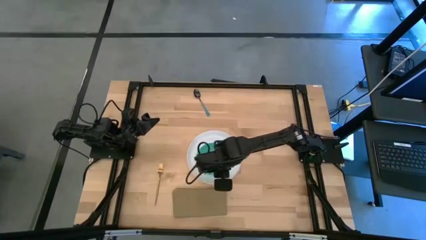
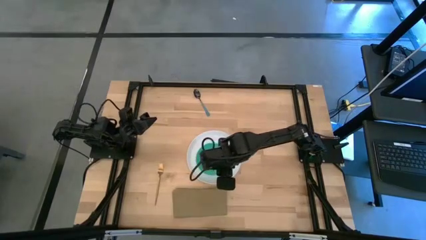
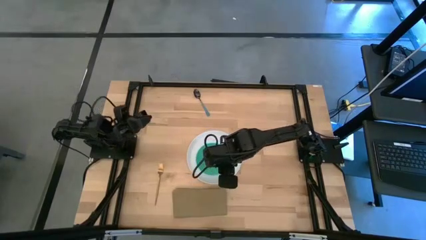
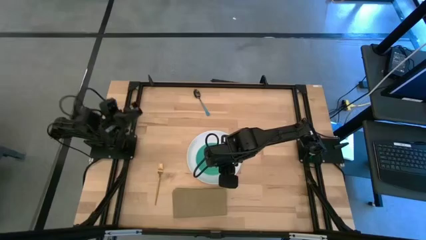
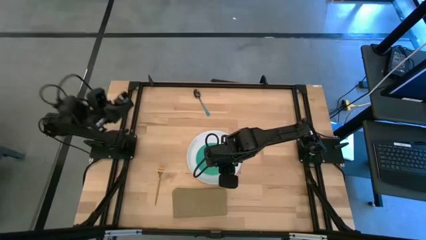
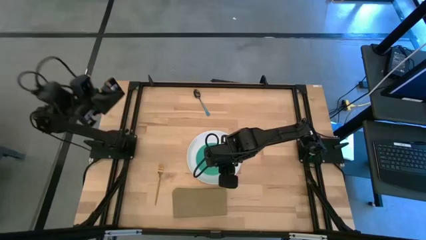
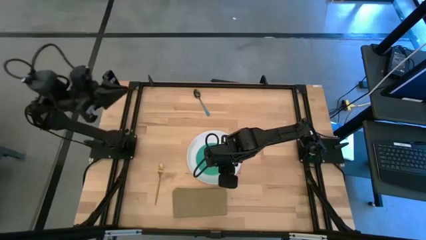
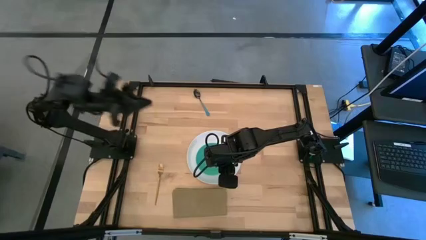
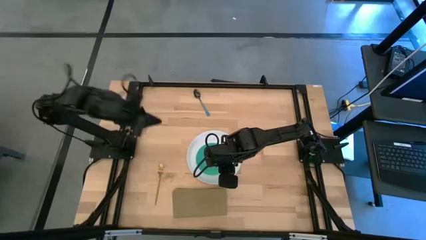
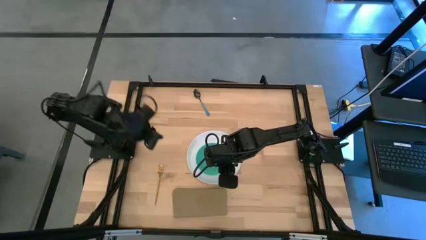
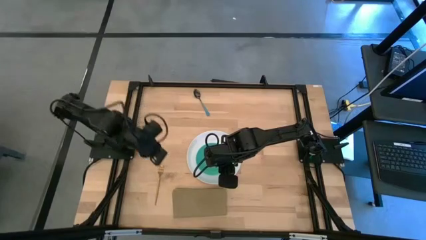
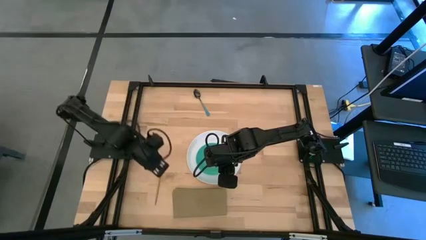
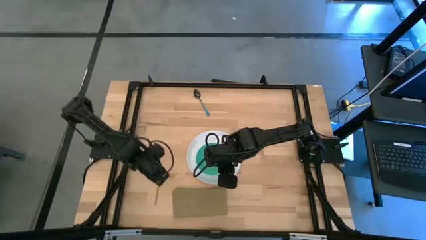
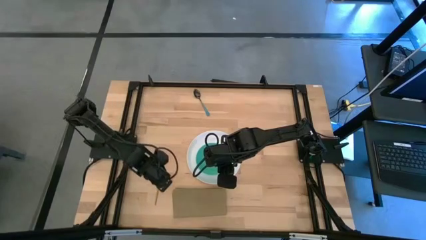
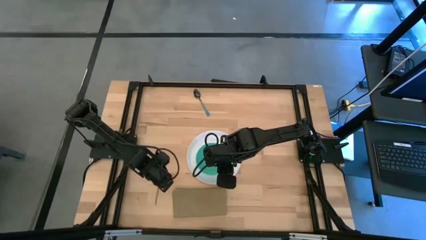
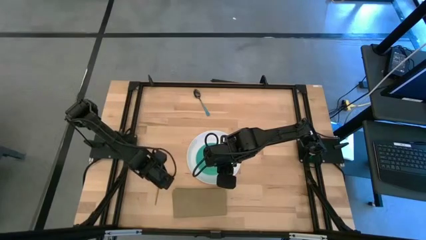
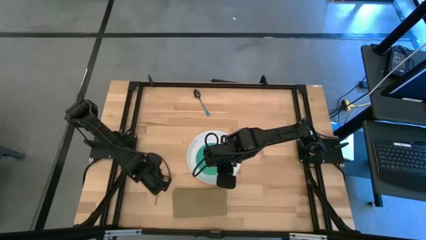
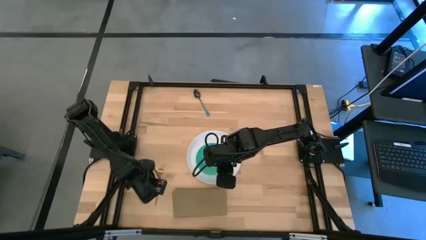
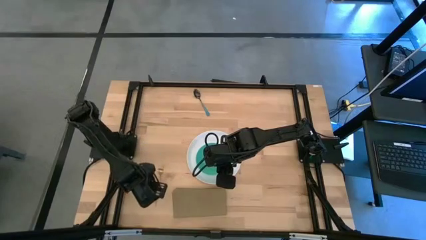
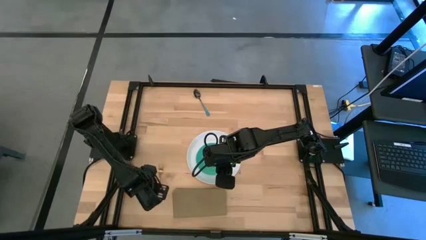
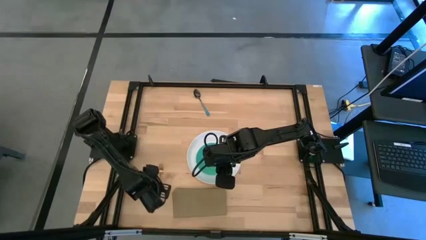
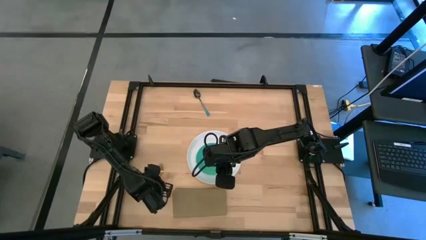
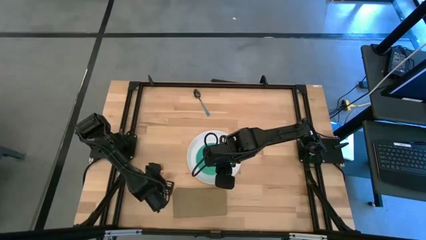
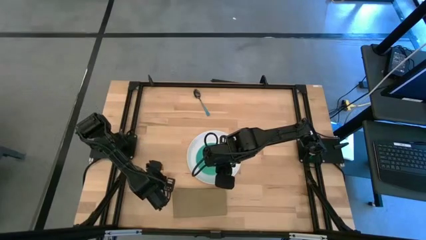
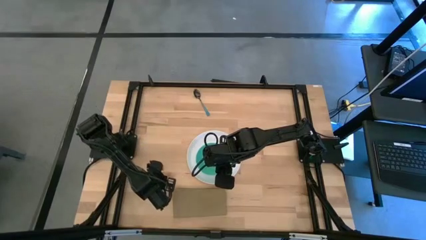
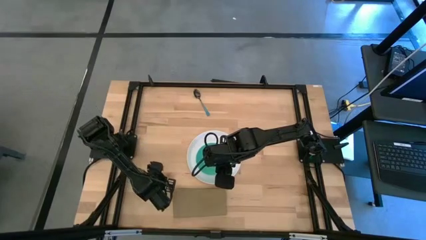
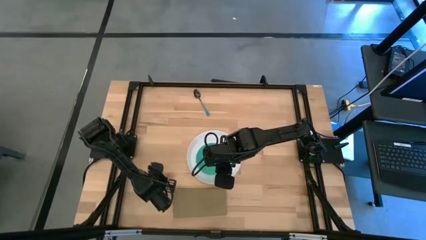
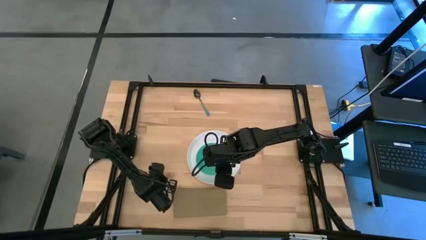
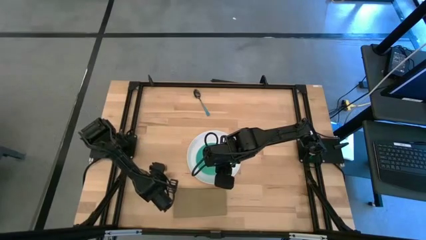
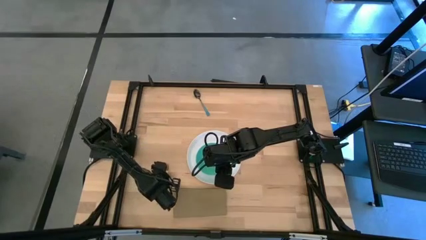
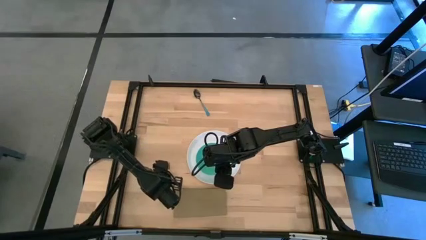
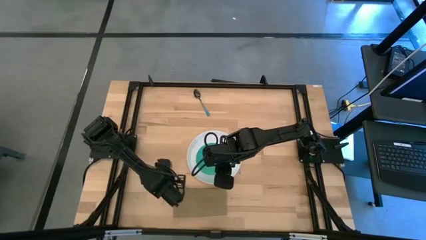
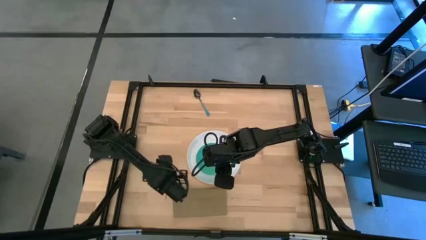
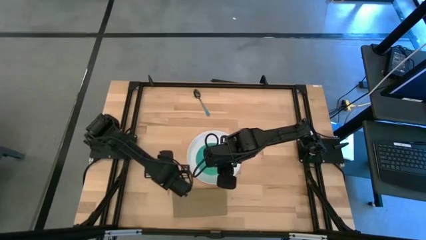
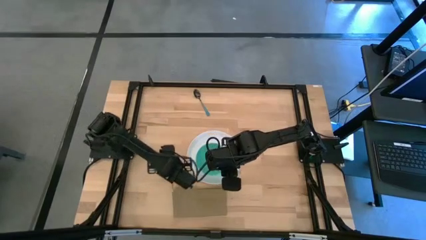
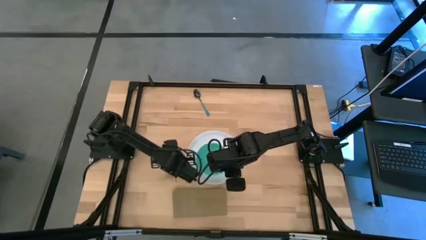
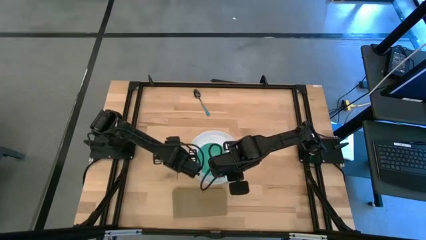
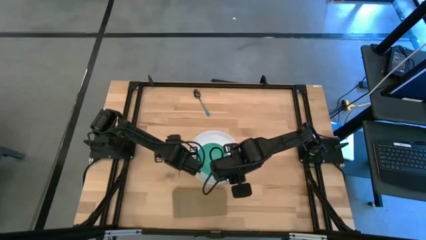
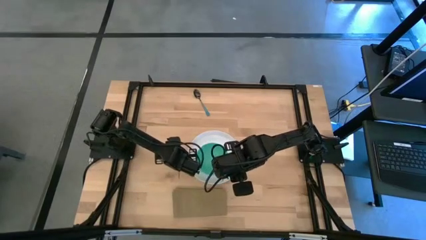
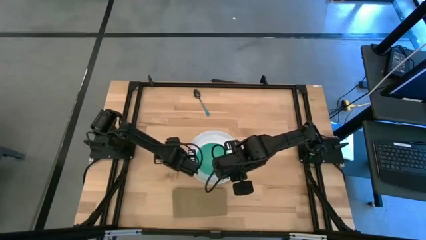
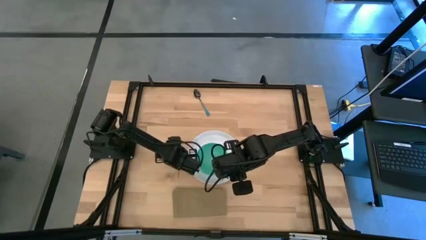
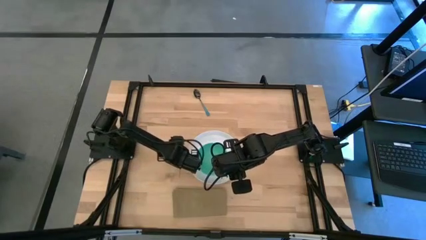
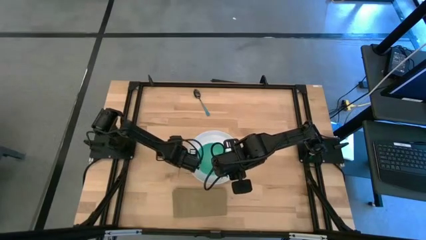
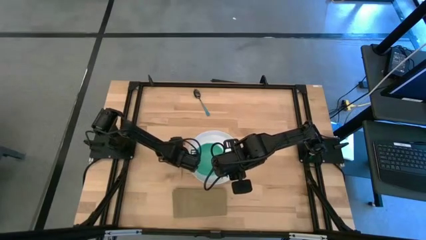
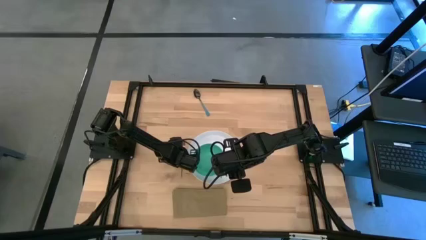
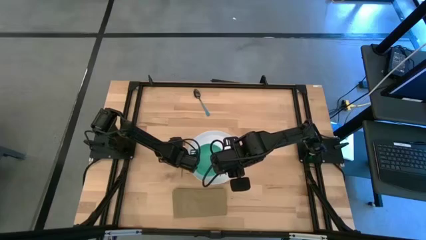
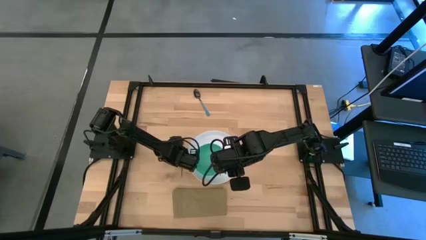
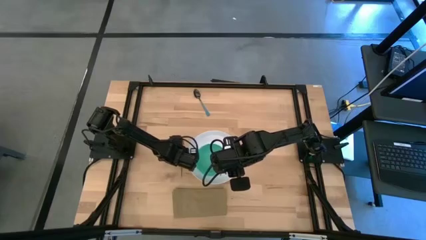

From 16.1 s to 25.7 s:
Task: Set table place
Put the gold fork on the left side of the white plate
